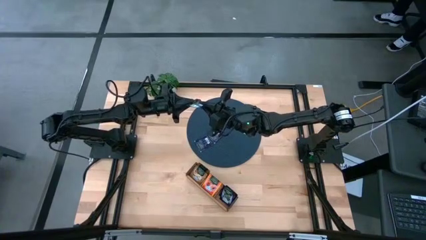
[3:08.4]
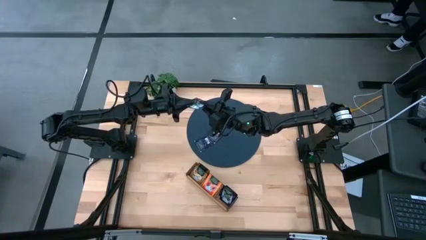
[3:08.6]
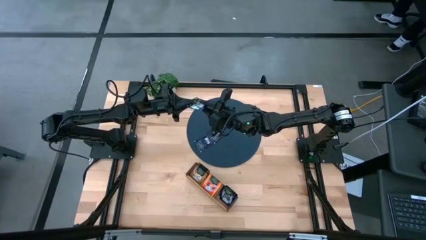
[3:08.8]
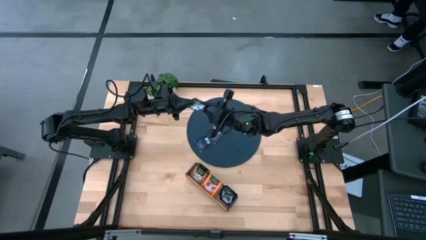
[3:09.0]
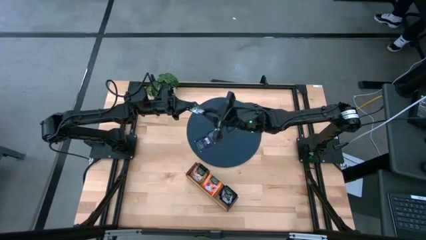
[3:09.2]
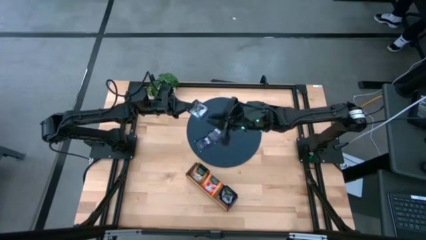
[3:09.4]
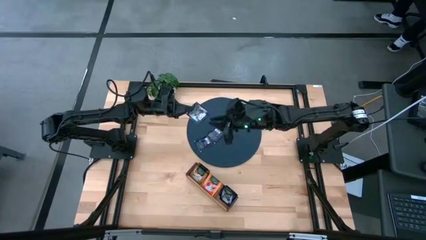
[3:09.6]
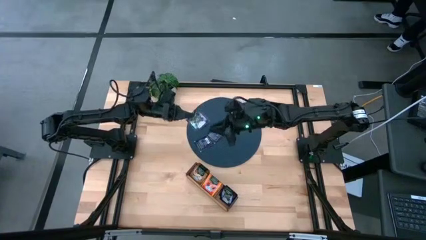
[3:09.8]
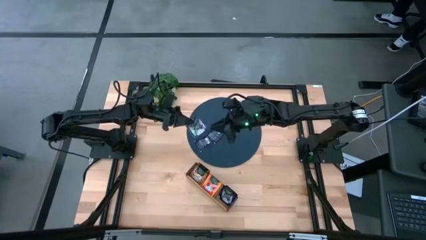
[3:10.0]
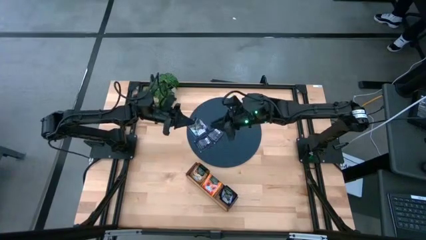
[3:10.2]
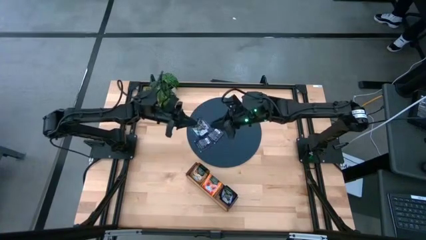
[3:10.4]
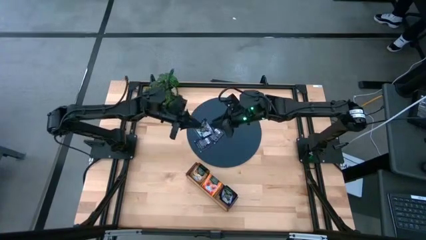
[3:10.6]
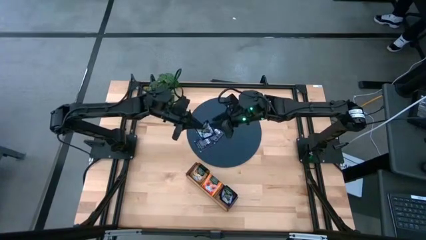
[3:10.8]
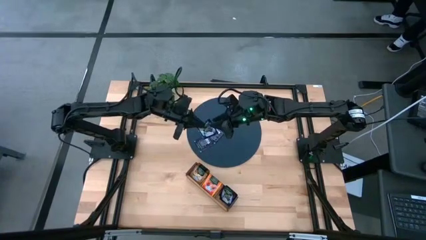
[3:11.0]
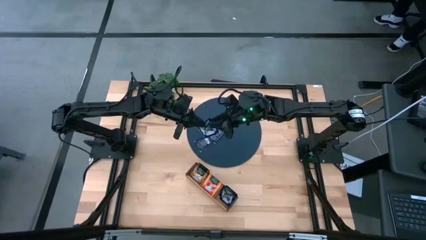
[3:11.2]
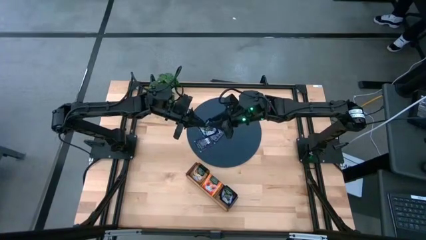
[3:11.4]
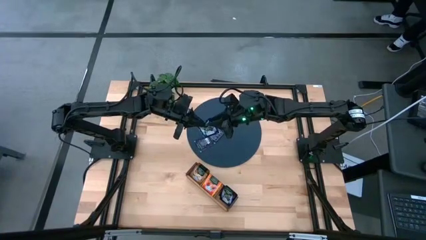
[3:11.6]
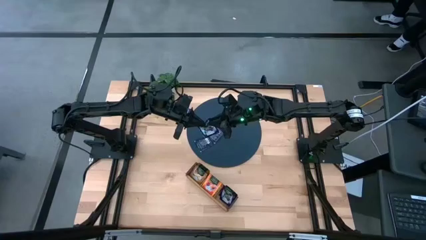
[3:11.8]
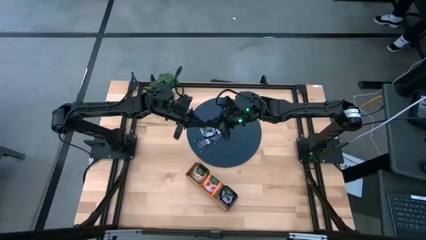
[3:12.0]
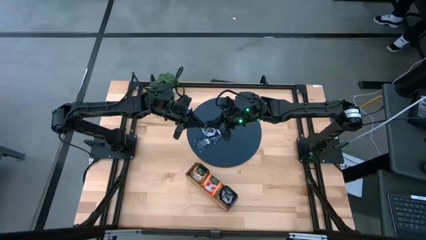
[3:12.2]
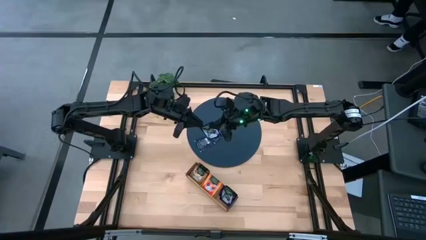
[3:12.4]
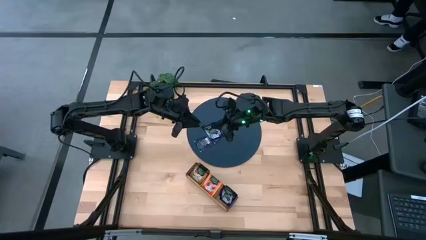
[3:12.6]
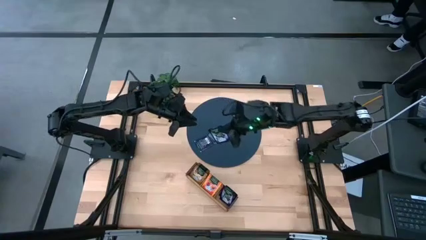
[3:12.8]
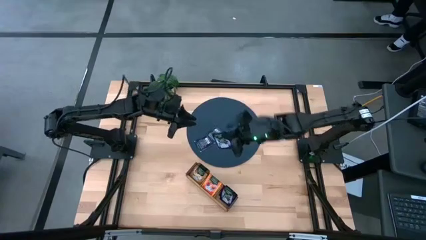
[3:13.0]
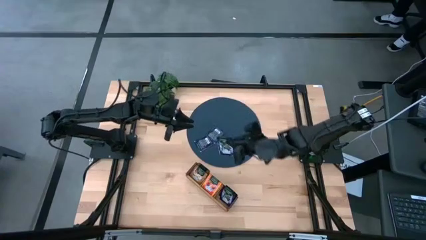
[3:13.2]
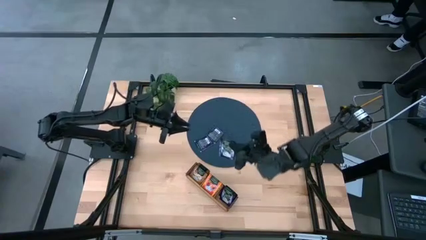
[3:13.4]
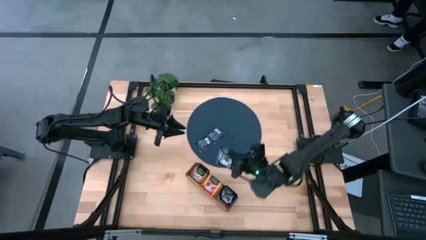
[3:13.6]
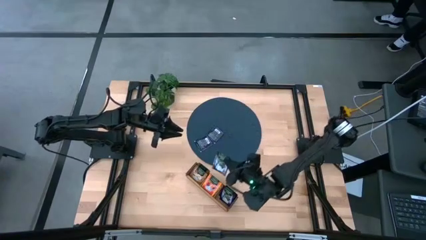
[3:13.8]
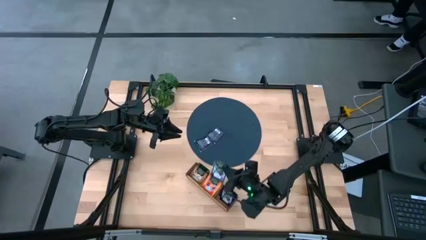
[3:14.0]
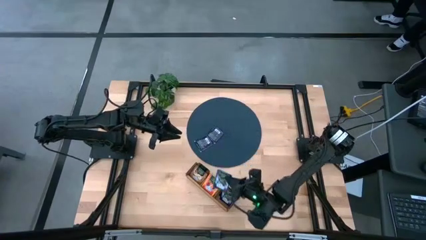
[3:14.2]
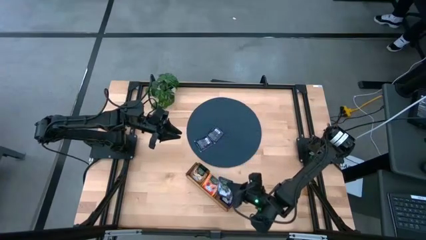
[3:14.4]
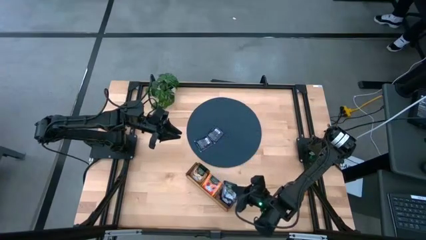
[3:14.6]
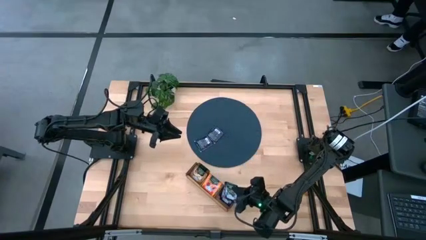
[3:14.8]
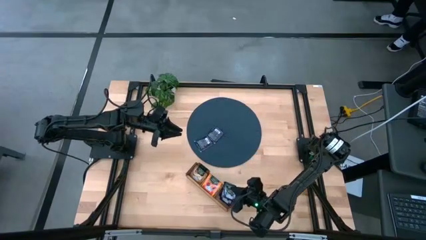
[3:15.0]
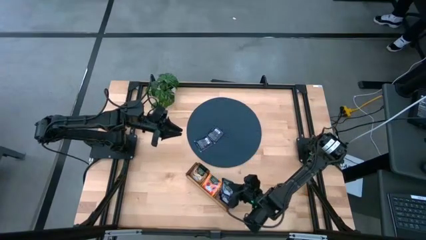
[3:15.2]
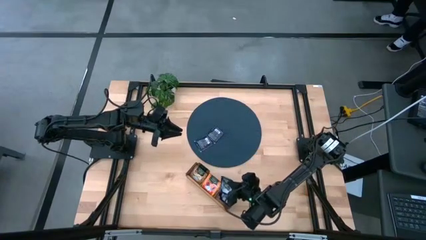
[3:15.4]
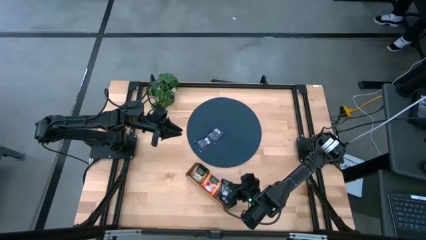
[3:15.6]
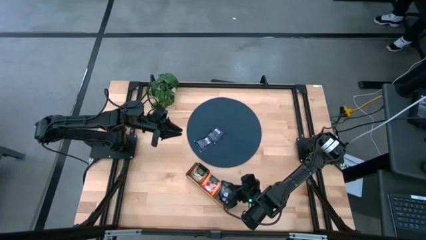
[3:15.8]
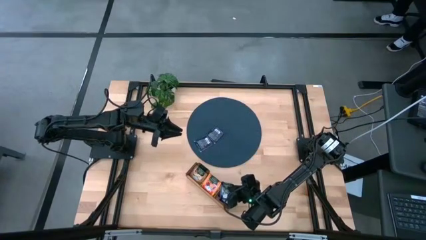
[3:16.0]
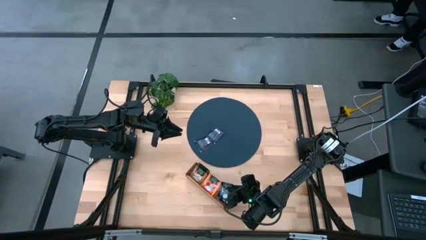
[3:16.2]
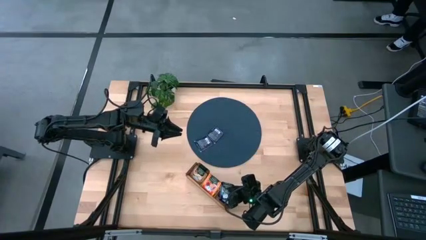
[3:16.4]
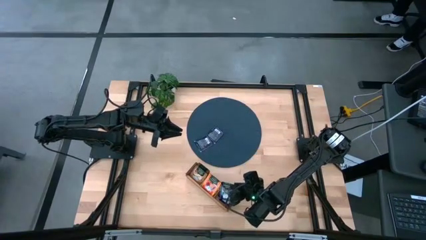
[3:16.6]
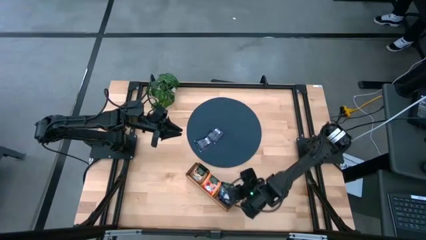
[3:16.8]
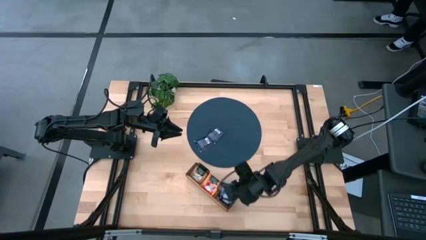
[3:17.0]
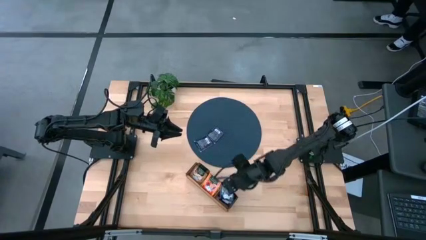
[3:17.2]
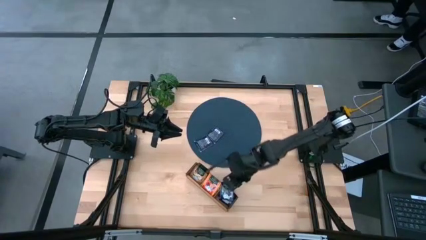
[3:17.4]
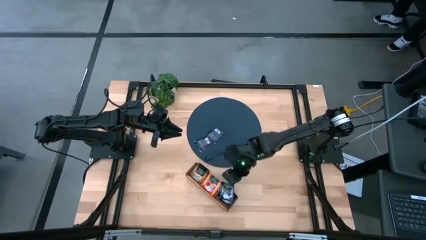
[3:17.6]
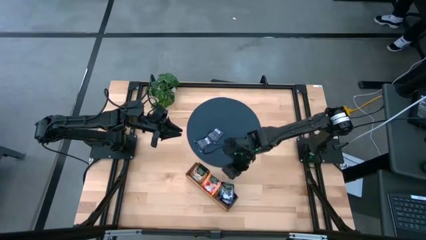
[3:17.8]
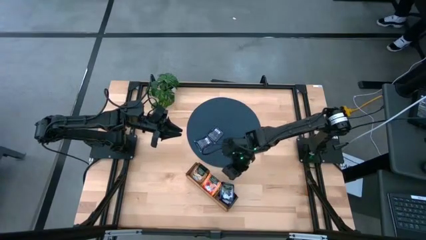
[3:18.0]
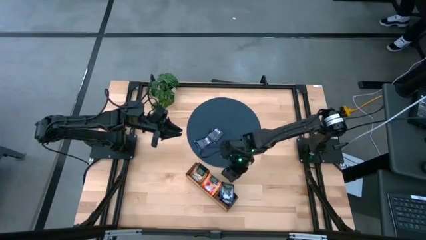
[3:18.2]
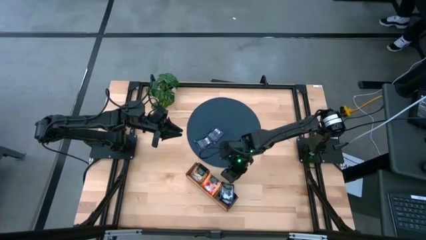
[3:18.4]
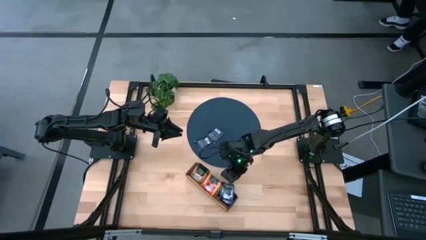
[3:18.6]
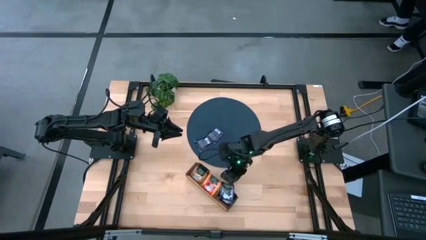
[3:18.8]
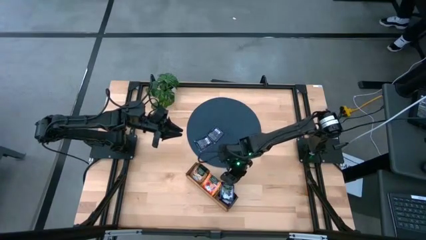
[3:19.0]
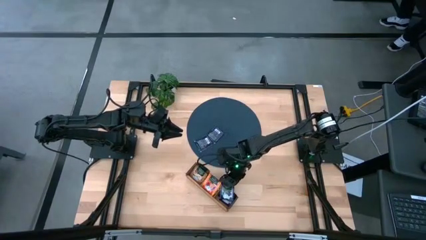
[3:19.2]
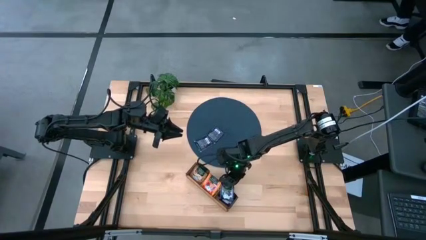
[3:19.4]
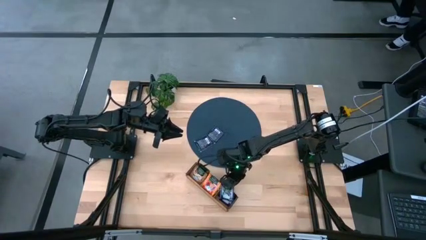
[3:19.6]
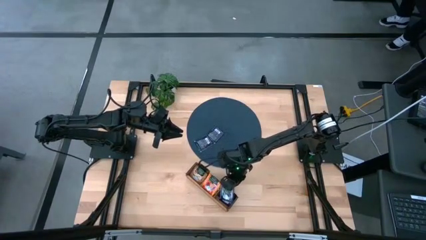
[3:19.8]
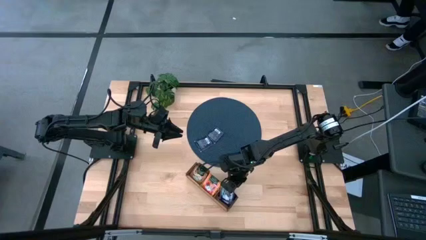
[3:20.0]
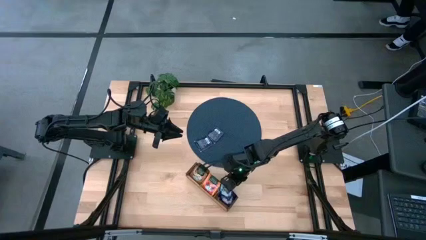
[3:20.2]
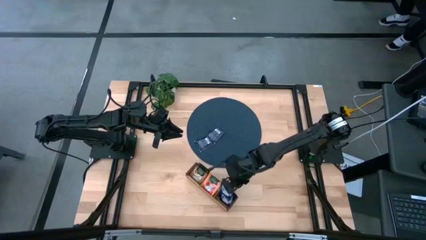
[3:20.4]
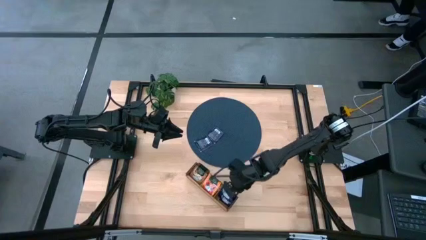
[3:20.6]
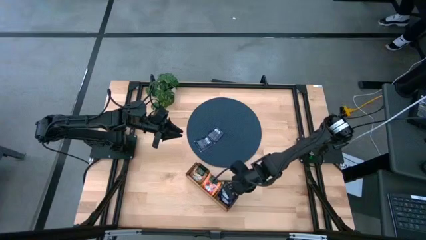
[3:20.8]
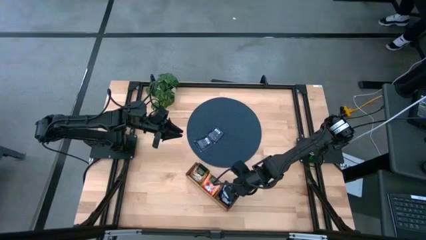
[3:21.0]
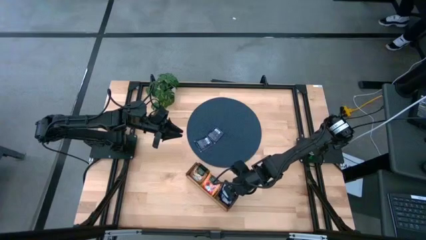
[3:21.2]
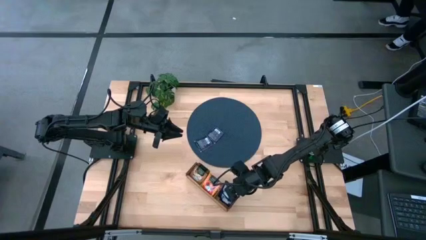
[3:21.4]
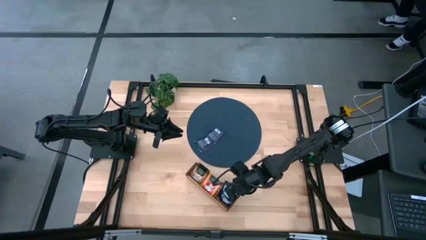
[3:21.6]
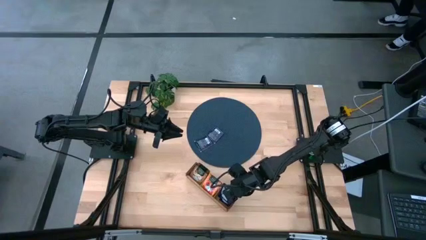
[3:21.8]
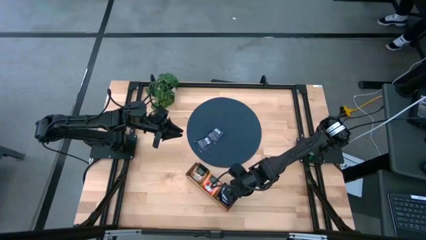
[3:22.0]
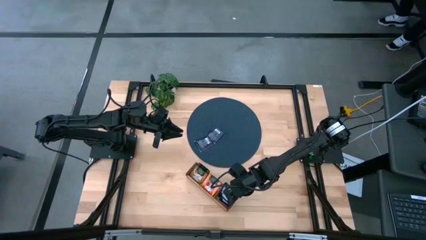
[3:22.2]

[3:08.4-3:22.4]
Task: Pick & Place Tea
Put the violet tea bag into the right section of the wooden organizer

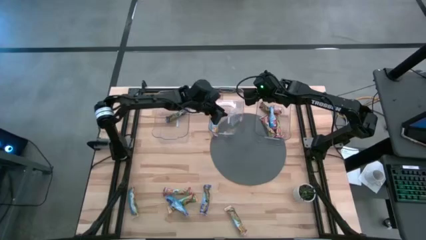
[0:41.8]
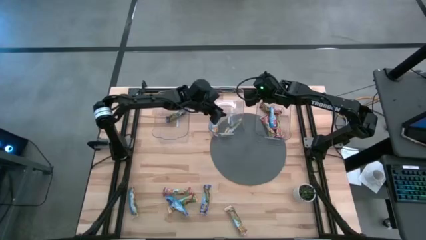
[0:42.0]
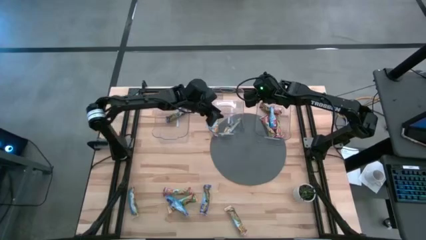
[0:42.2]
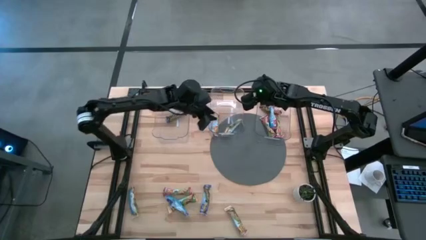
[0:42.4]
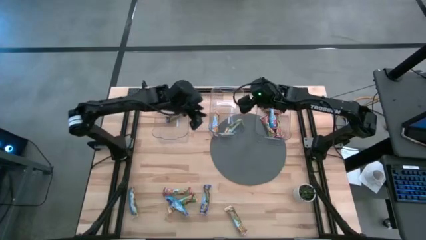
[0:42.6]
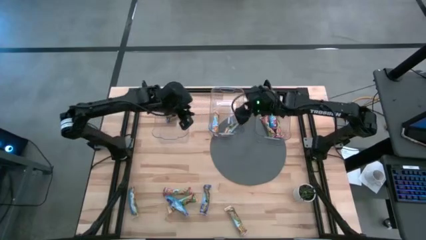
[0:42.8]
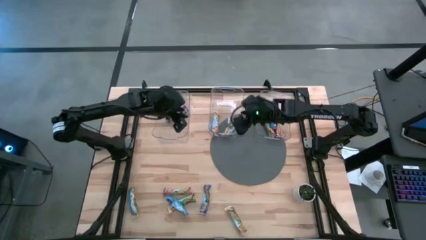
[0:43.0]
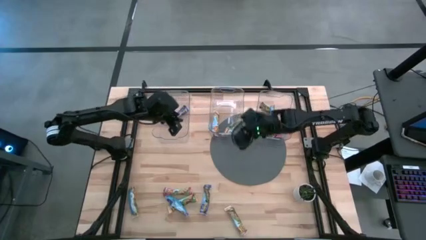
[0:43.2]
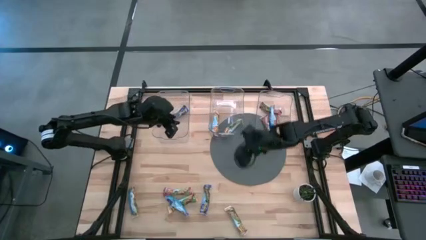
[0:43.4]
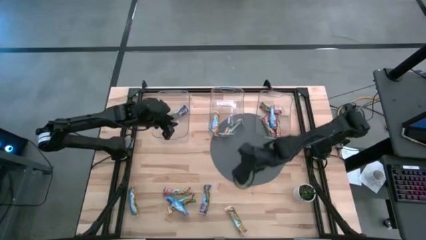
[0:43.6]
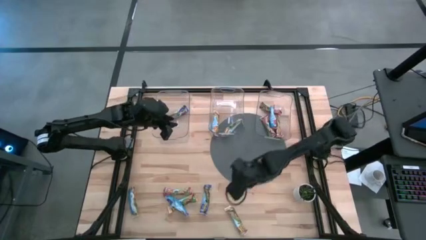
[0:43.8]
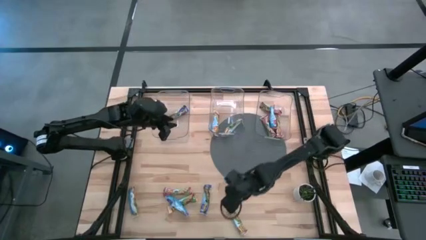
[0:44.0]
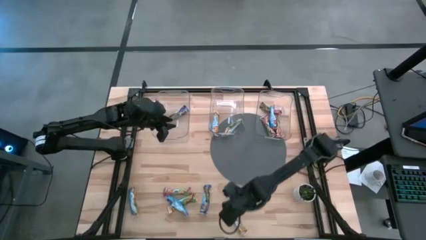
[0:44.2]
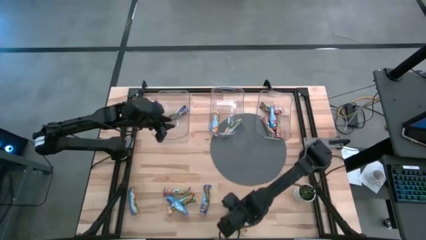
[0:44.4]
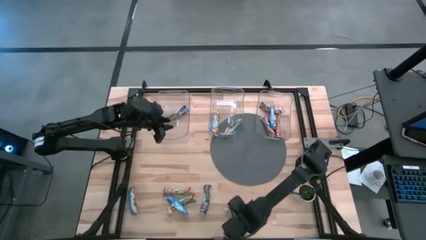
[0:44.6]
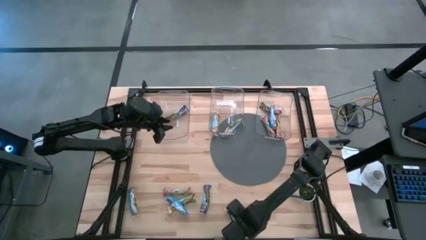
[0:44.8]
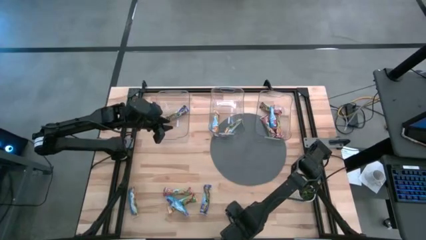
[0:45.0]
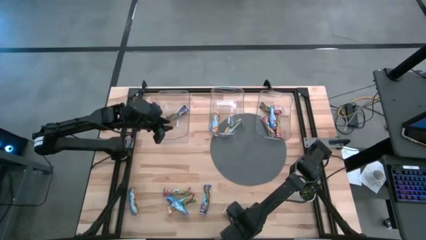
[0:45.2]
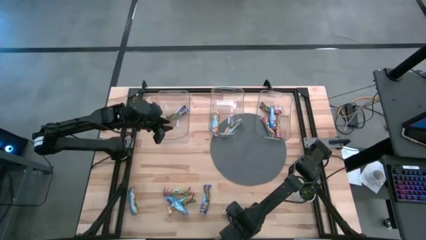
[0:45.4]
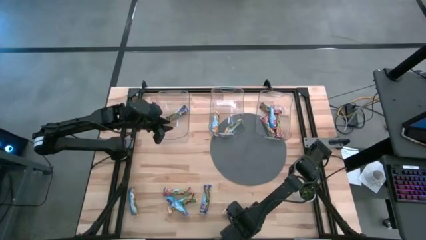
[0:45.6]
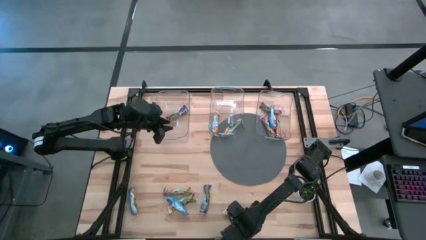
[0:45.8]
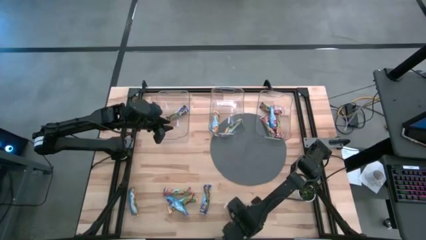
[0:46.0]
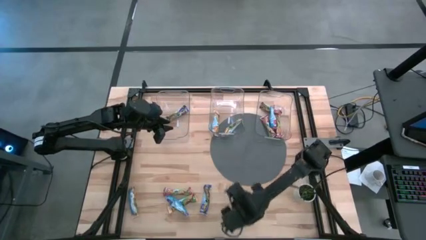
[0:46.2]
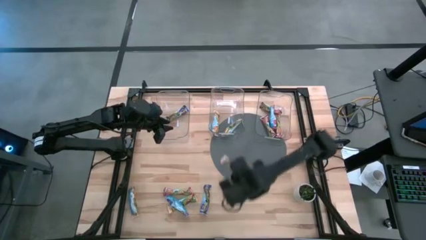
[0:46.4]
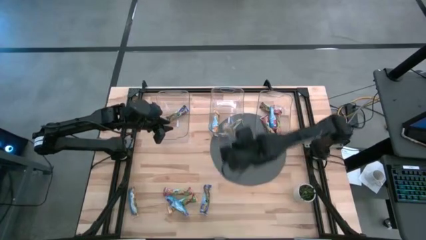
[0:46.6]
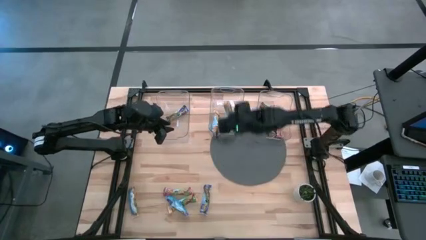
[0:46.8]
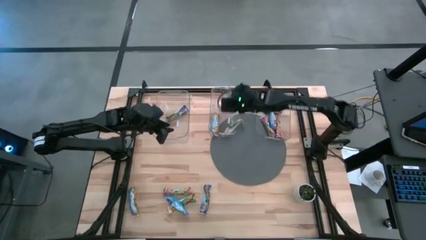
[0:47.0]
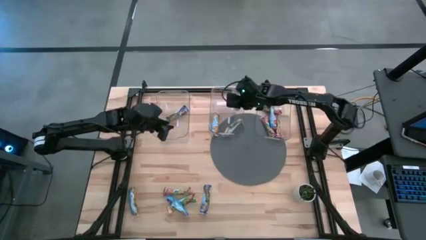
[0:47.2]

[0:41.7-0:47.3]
Task: Pick and place Granola Bars by type
Put the yellow granola bar into the middle transparent bin
